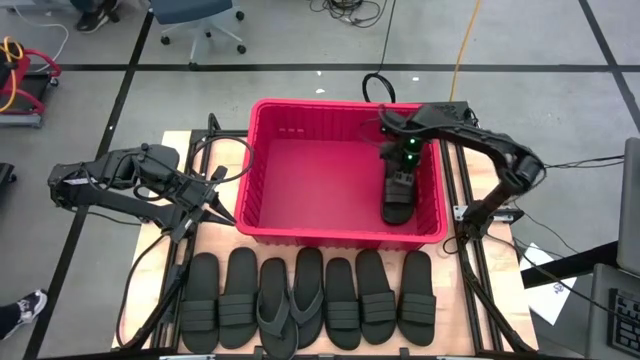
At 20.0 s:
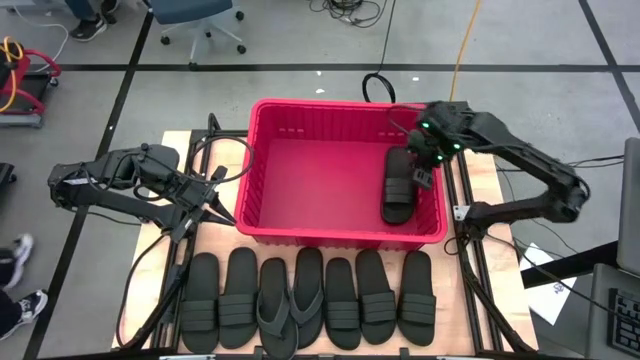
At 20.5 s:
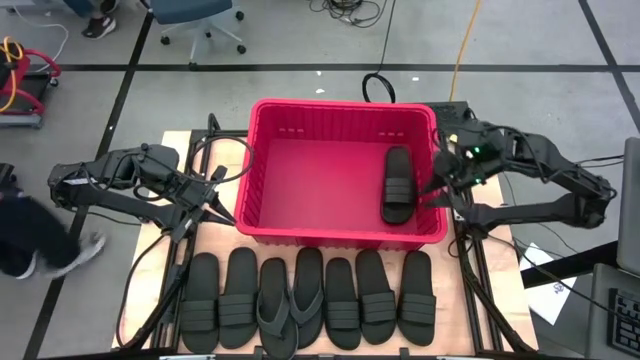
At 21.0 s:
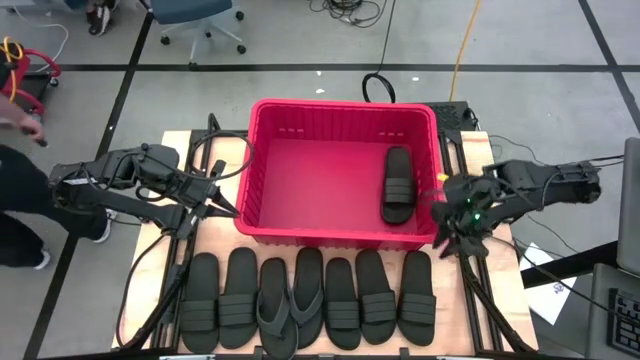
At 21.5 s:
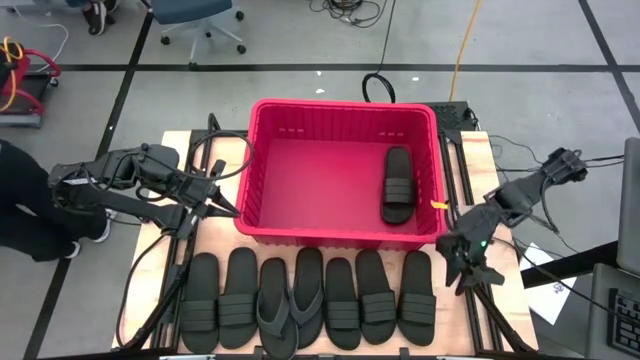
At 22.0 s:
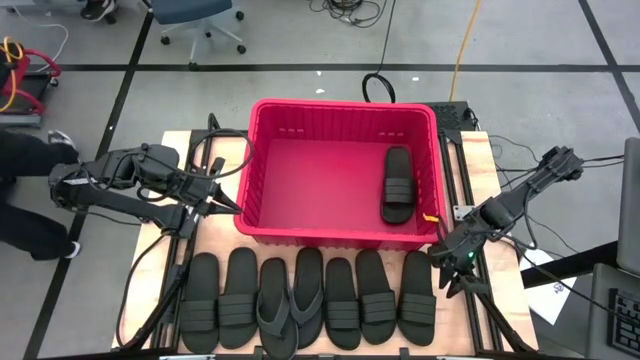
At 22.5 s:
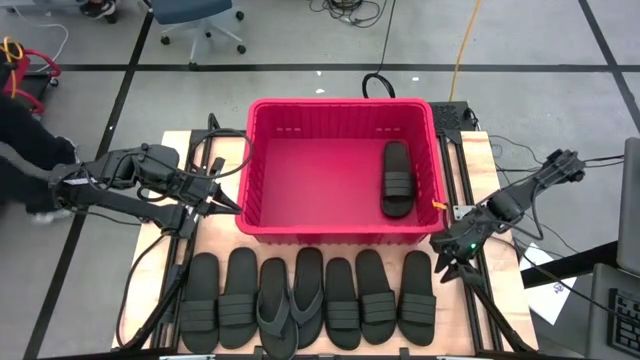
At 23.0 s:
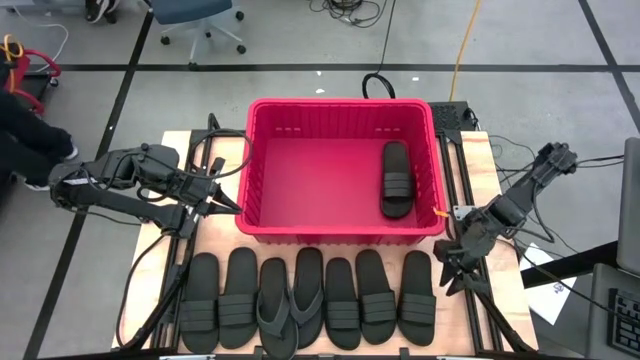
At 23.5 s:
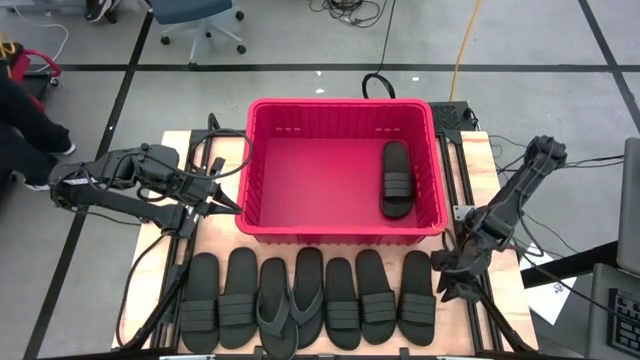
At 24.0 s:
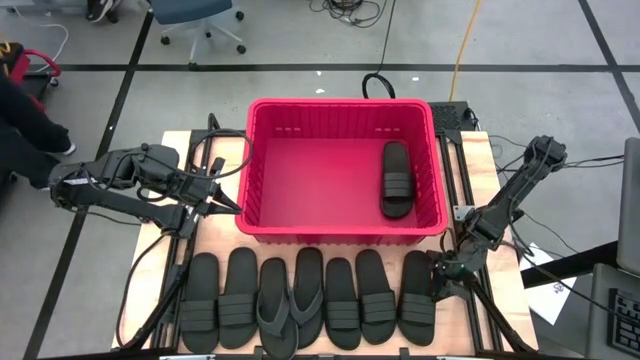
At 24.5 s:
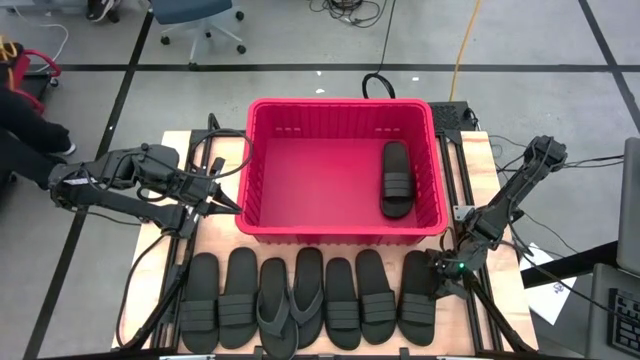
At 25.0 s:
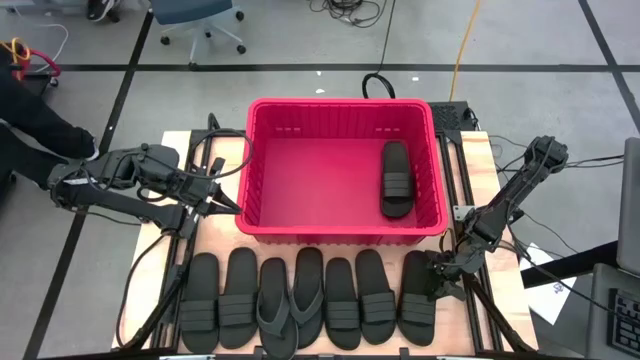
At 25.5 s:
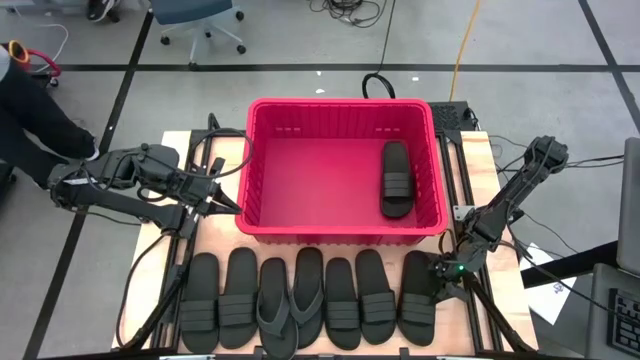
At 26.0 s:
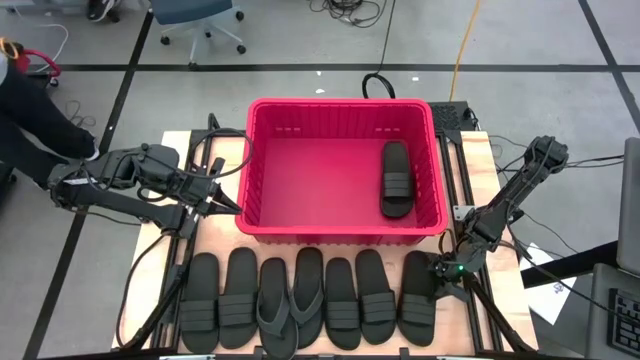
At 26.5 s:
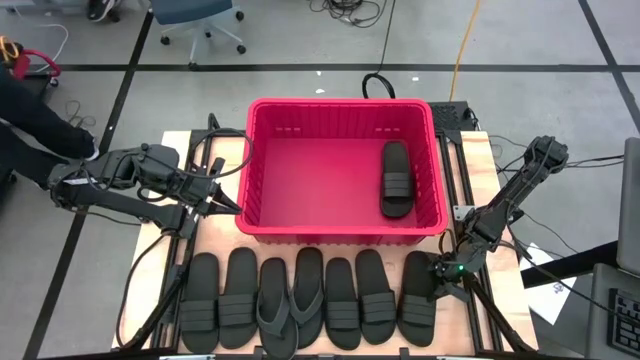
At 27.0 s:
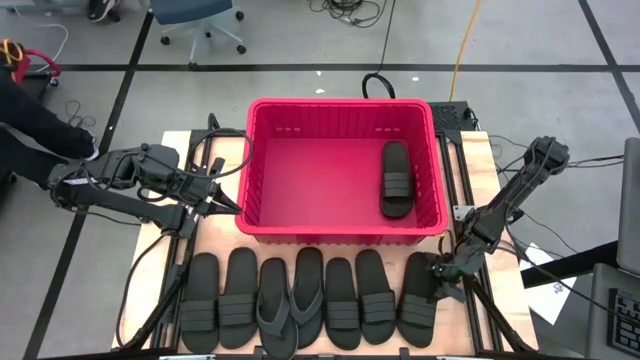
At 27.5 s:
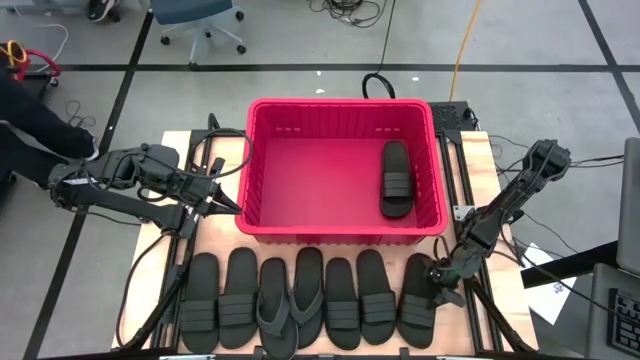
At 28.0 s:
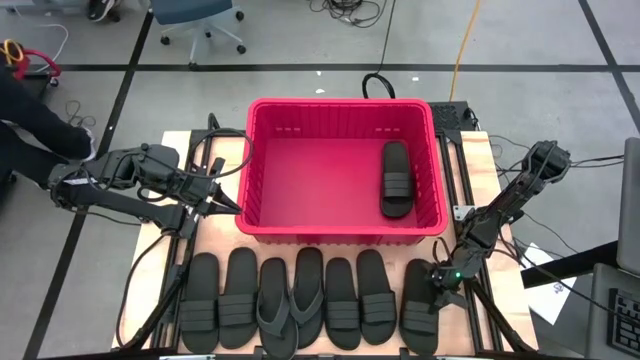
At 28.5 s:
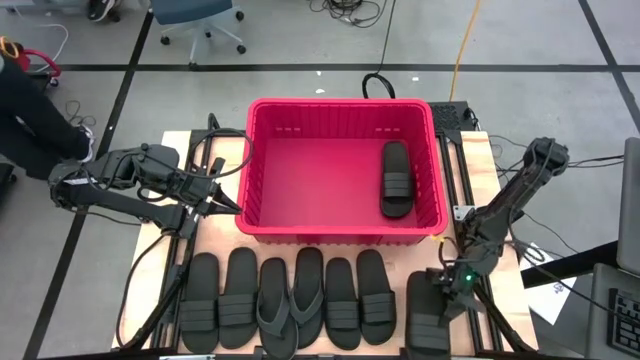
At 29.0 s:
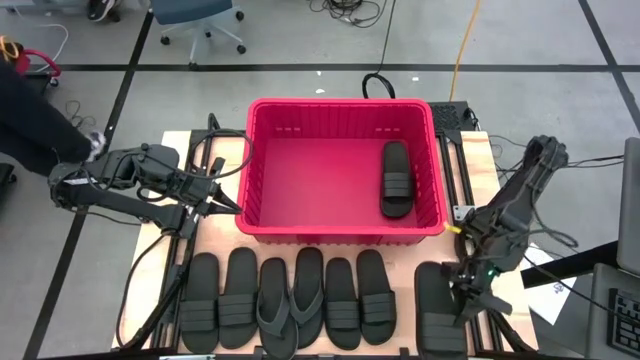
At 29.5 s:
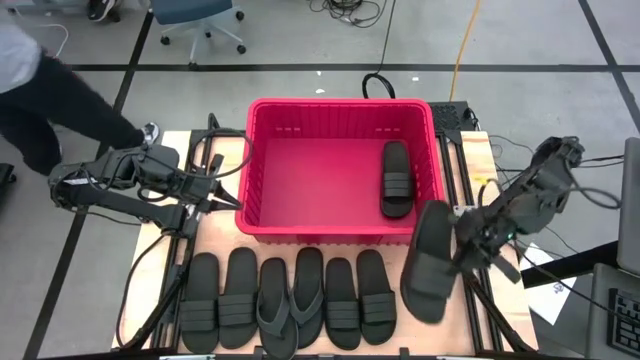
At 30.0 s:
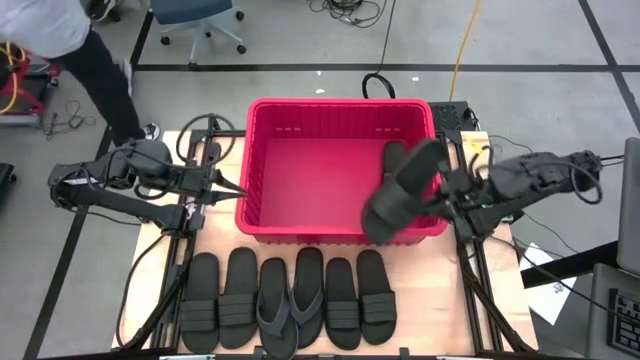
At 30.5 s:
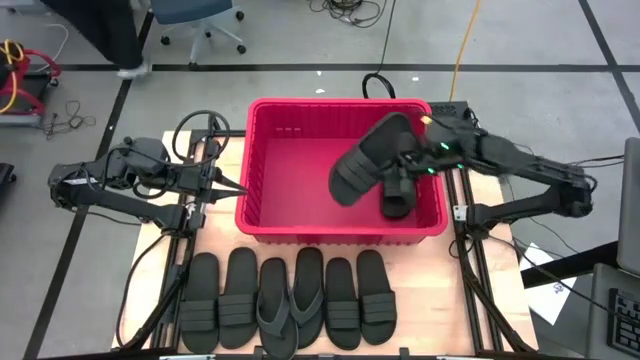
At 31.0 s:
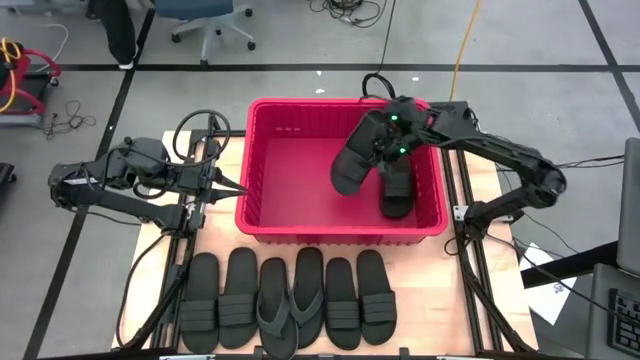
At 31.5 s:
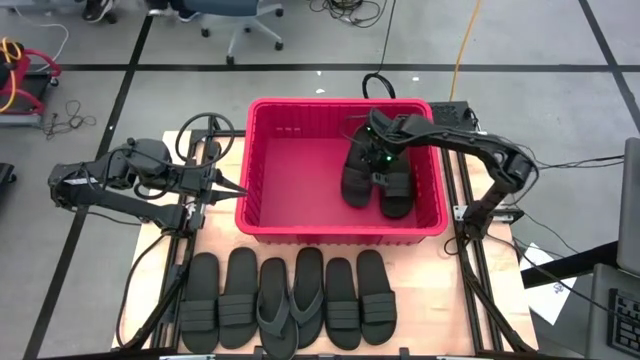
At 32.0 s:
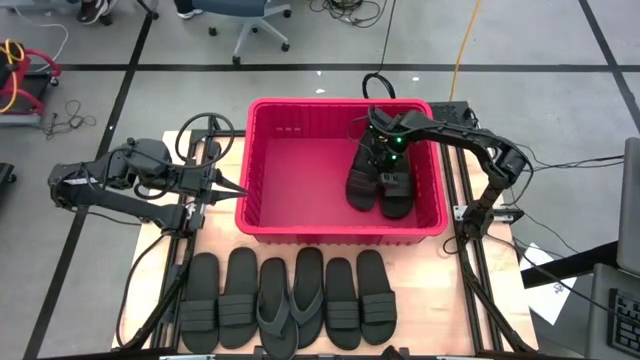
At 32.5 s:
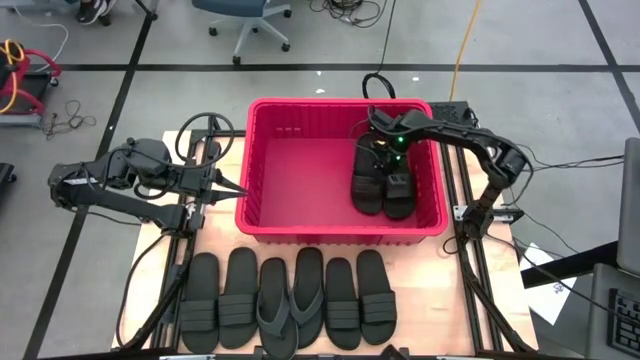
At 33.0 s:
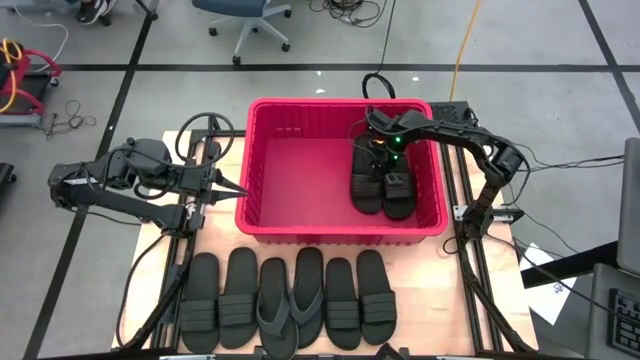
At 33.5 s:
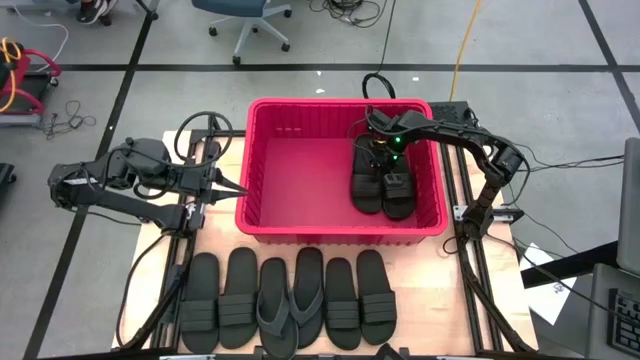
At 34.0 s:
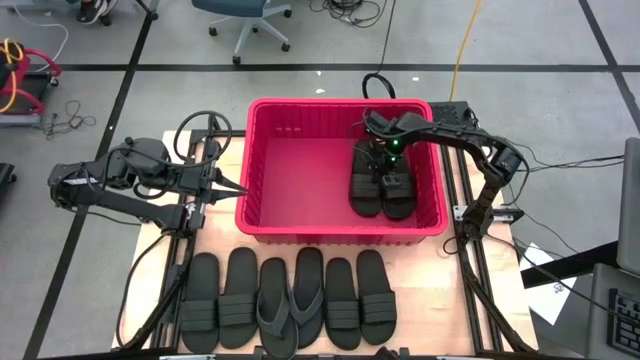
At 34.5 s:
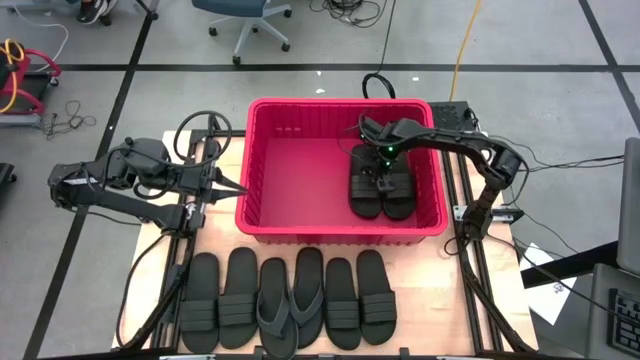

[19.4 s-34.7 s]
Task: Pick and place slides into bin
Put the black slide into the red bin

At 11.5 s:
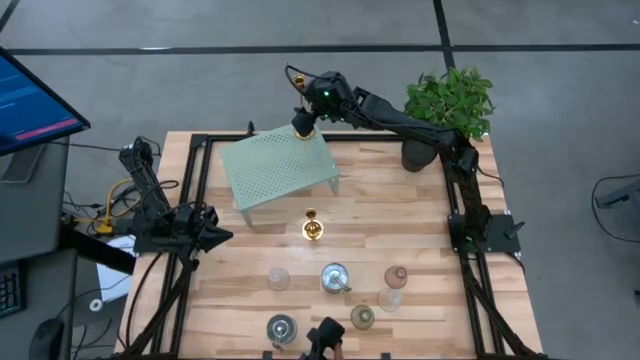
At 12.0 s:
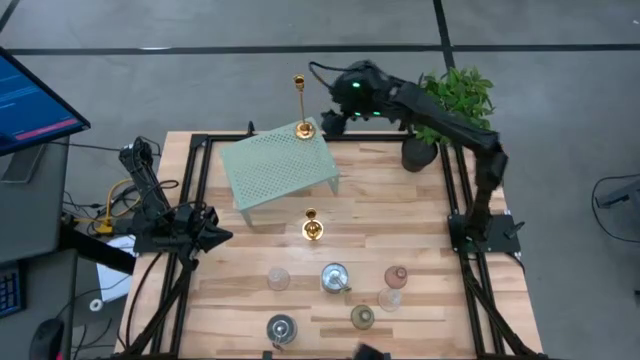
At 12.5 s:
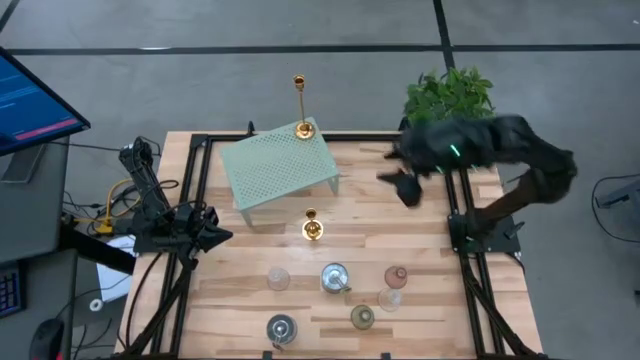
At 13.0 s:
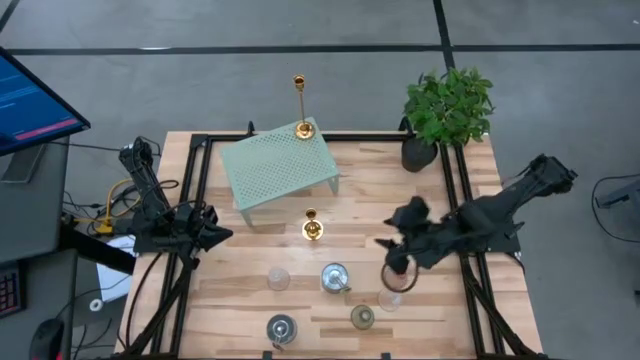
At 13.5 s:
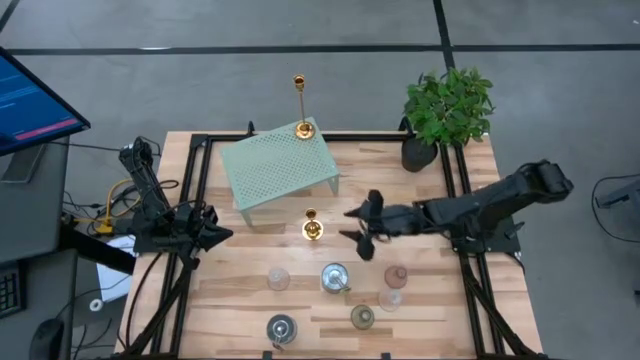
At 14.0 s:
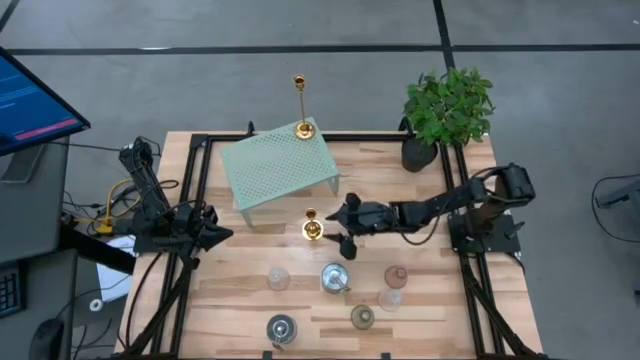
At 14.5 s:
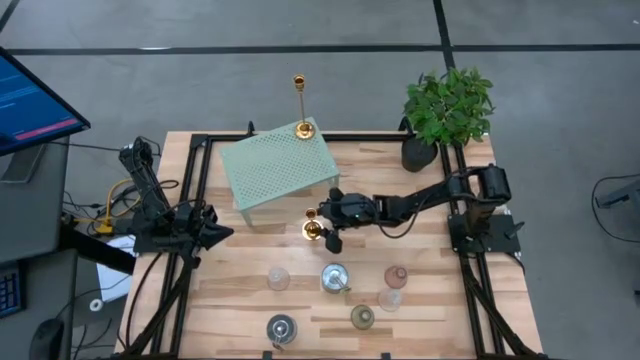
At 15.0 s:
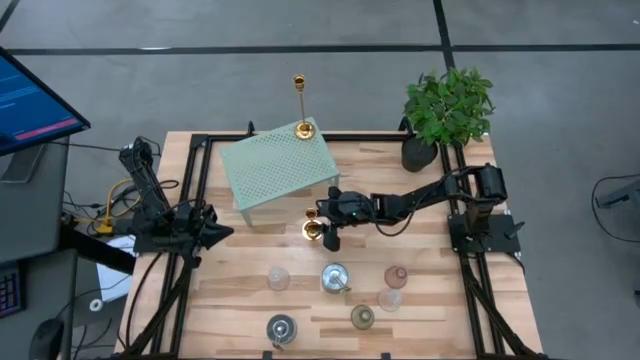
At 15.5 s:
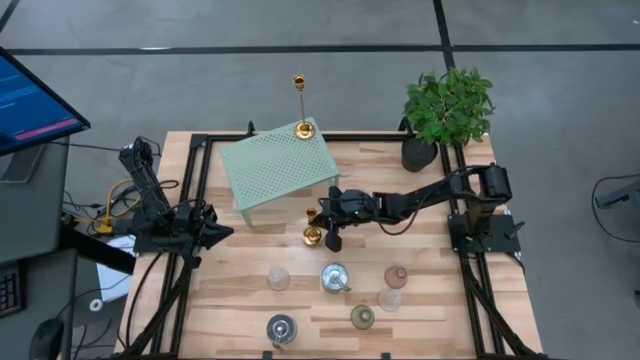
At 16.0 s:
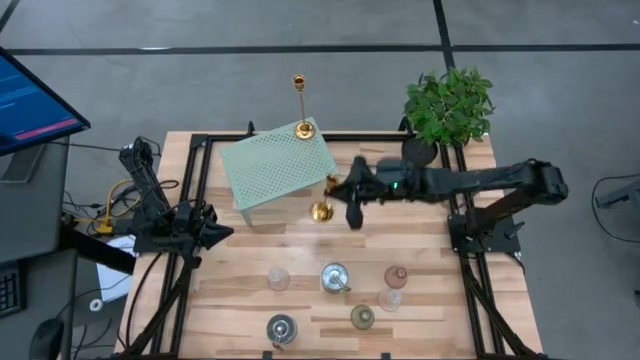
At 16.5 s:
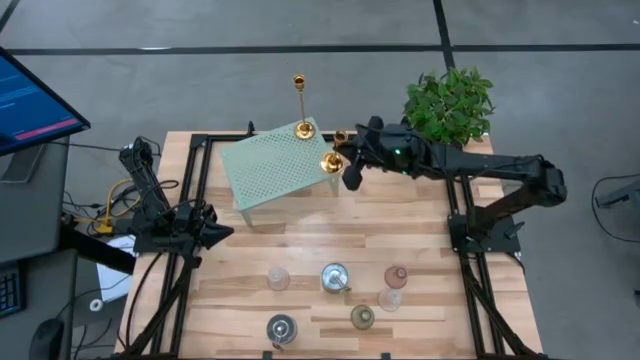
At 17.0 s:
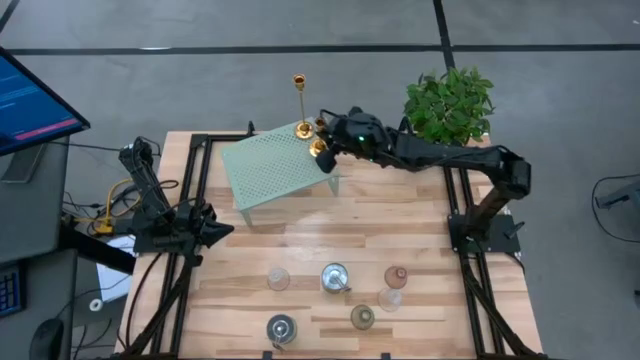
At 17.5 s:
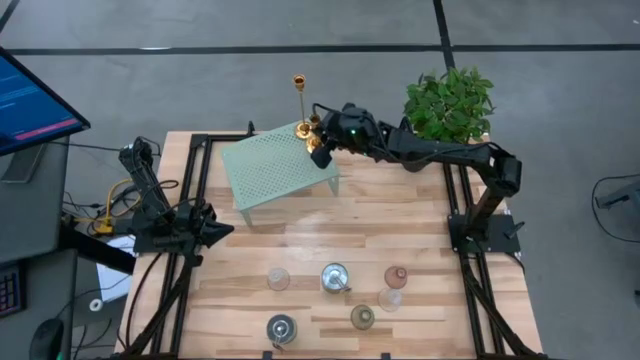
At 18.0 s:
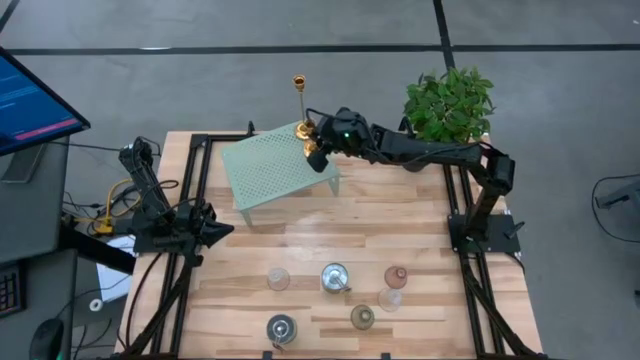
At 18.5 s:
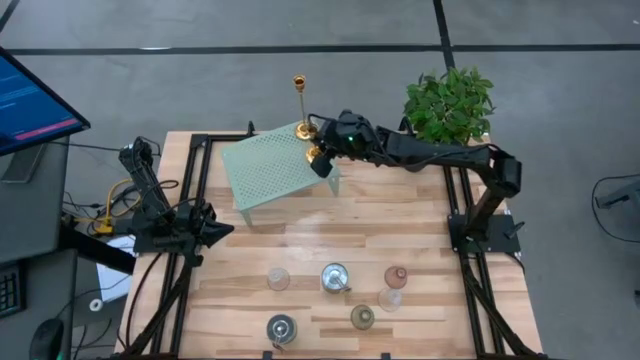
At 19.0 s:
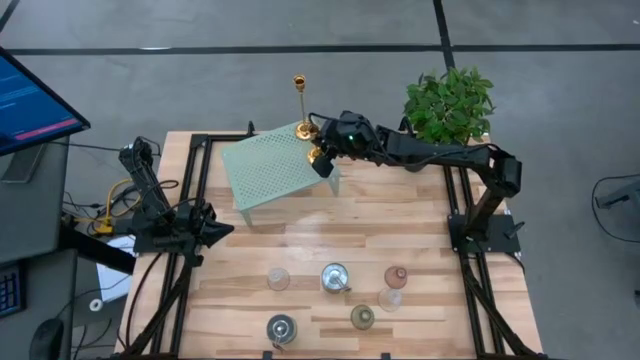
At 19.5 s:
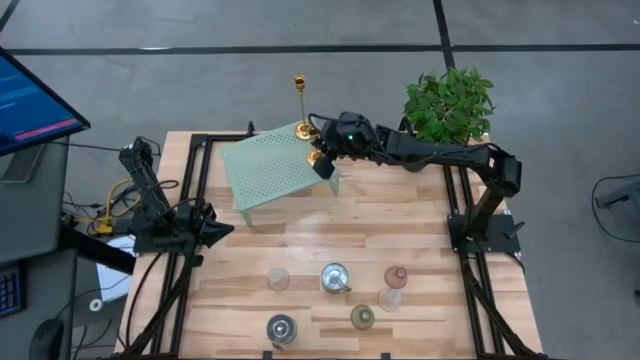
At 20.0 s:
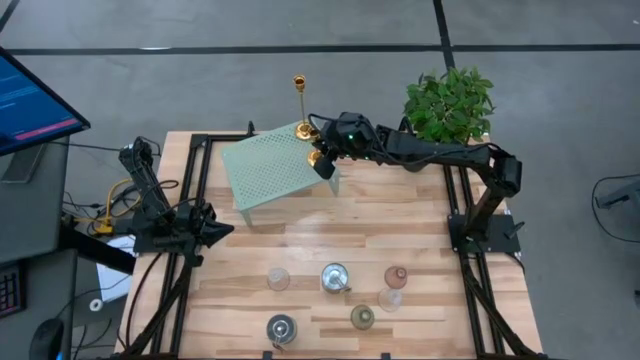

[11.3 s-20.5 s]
Task: Pick & Place candle stick holders
Align the gold candle holder with the other gold candle holder on the shelf
